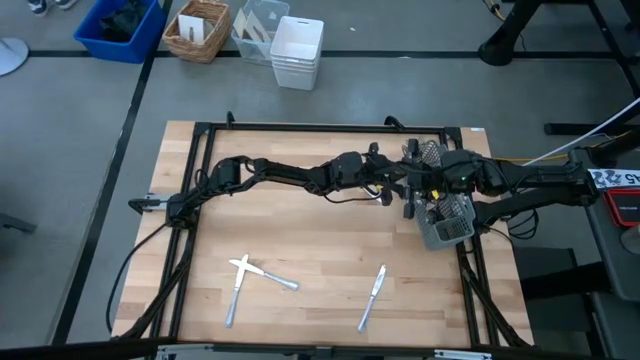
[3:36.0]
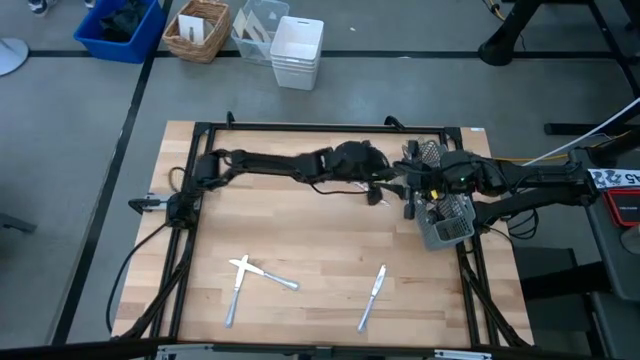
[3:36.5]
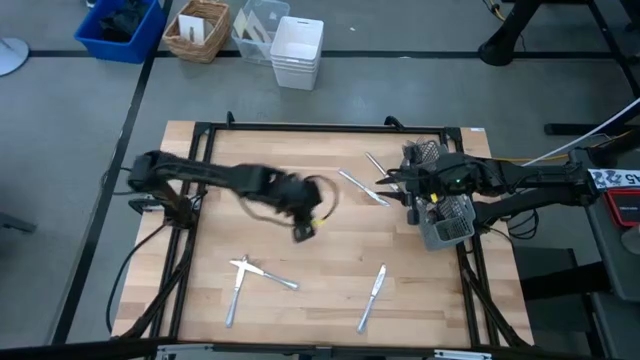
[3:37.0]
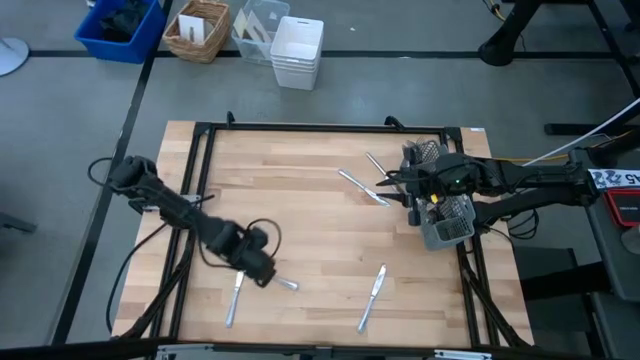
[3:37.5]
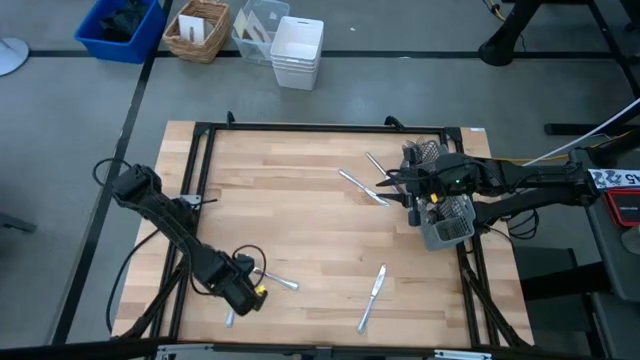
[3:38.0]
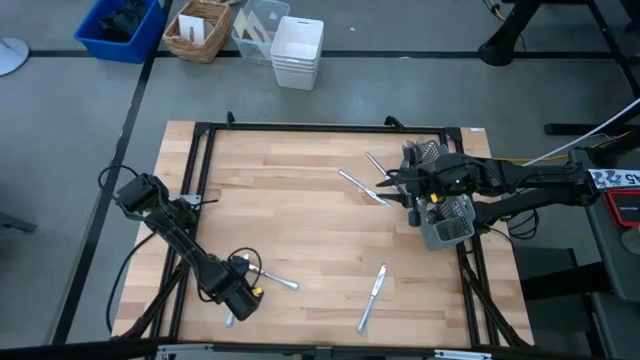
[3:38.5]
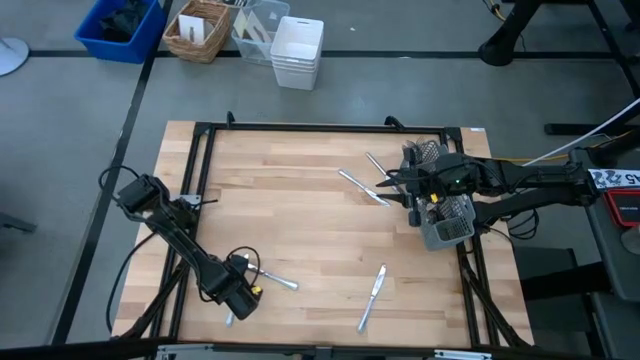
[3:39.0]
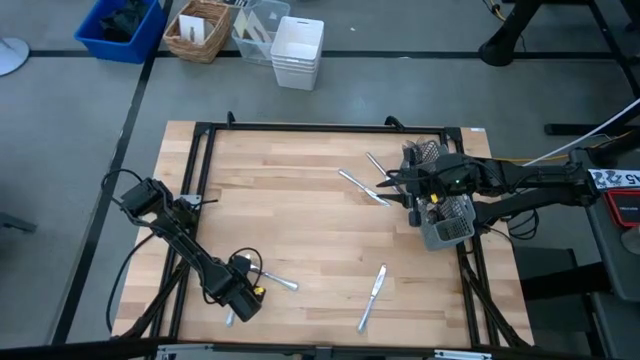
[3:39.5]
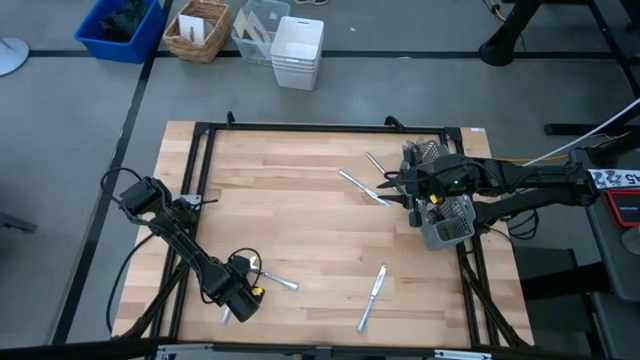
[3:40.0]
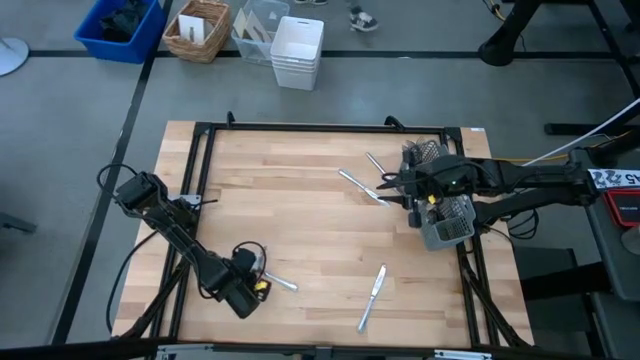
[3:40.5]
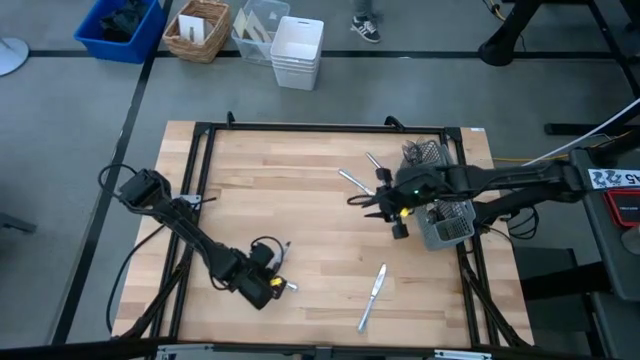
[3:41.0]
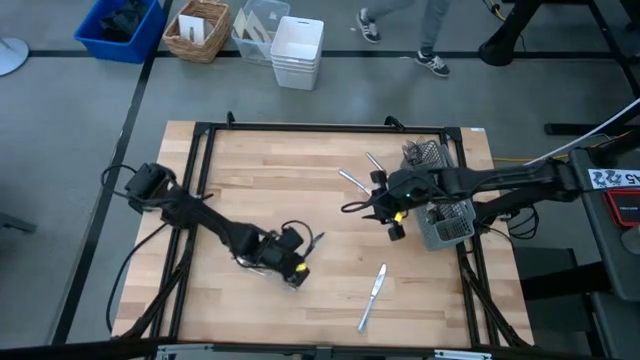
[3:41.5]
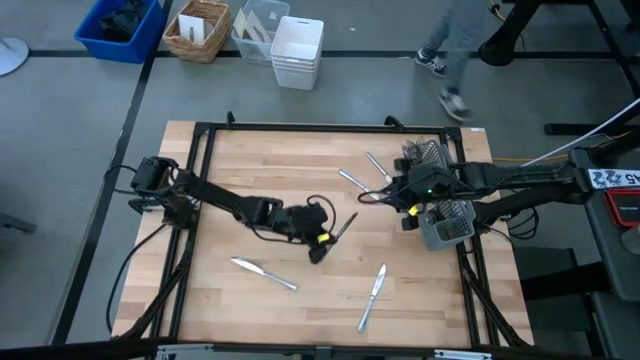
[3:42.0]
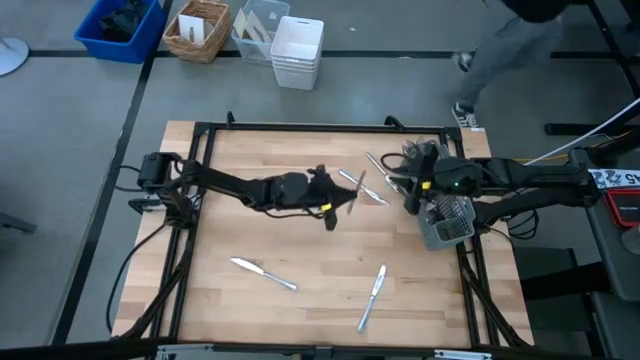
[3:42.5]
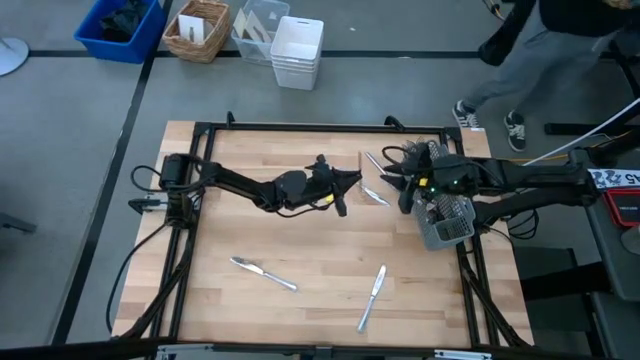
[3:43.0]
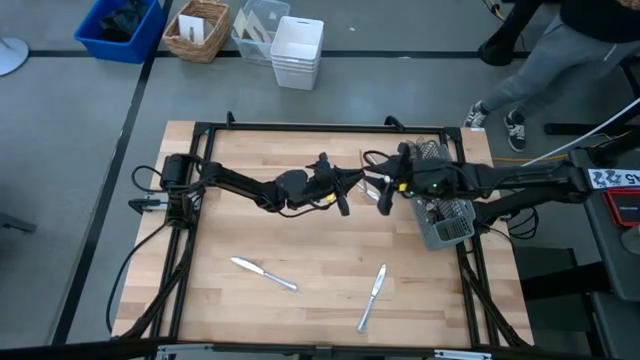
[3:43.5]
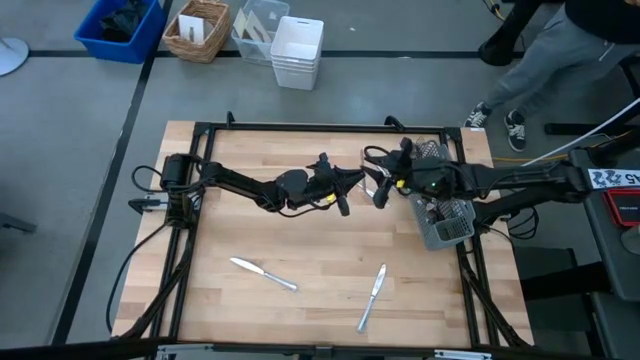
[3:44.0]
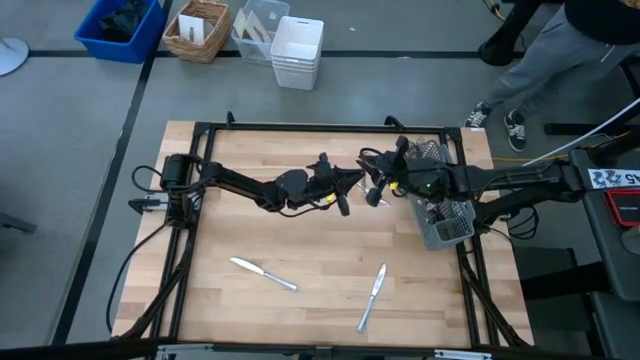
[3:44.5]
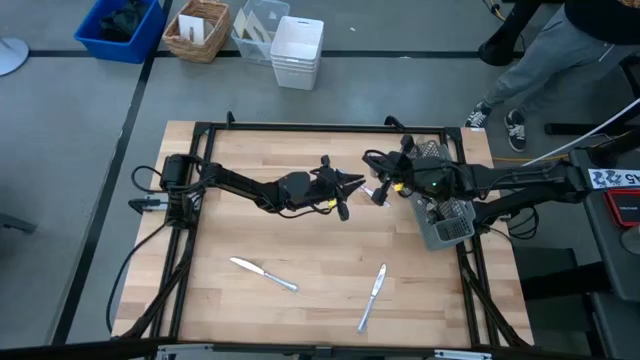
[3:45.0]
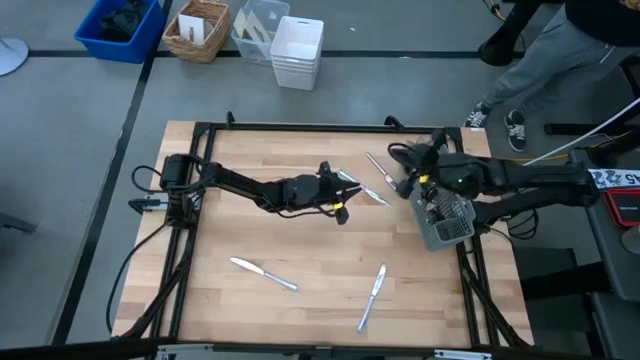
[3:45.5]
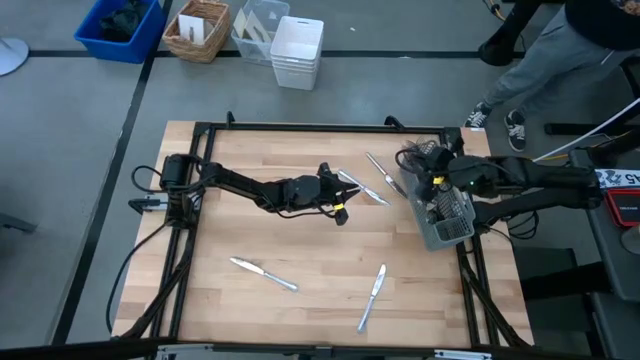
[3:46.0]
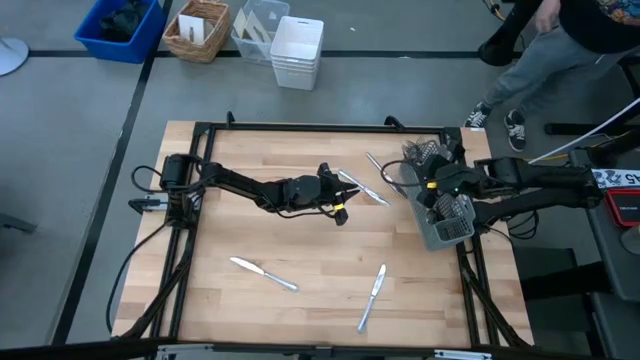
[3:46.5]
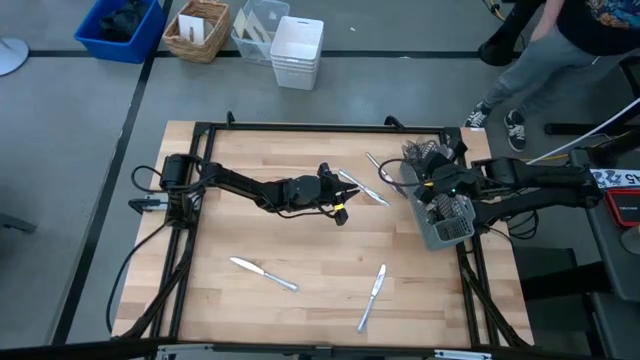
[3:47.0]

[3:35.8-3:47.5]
Task: Sort silverware
Put the knife into the middle section of the utensil holder

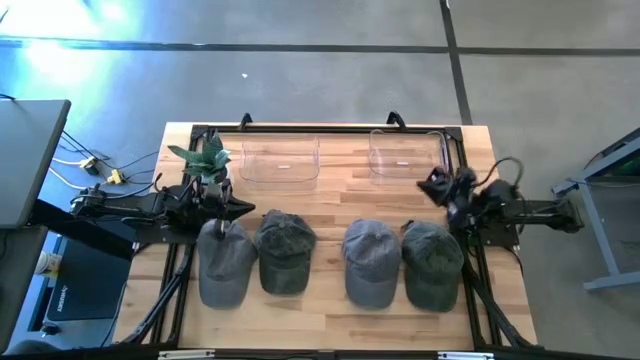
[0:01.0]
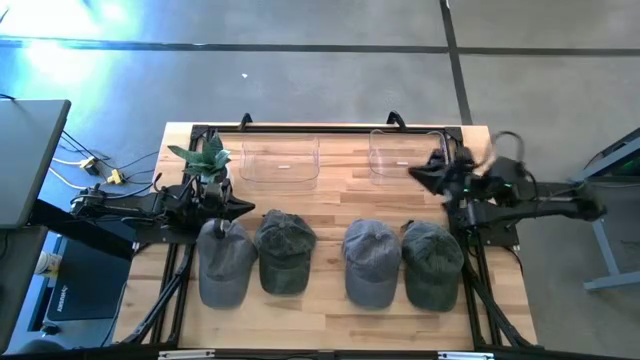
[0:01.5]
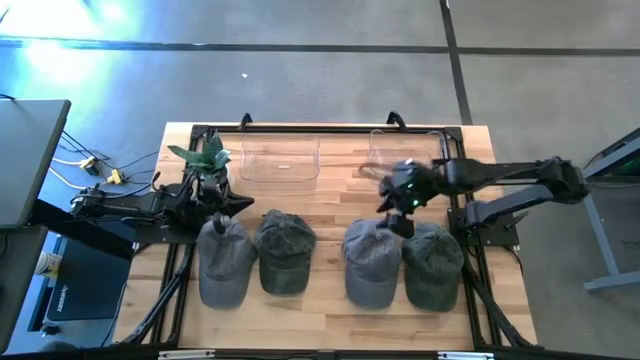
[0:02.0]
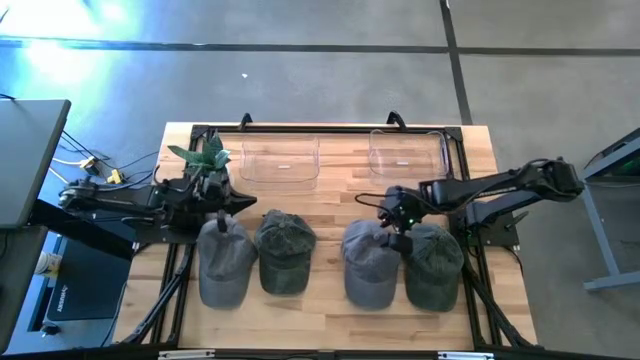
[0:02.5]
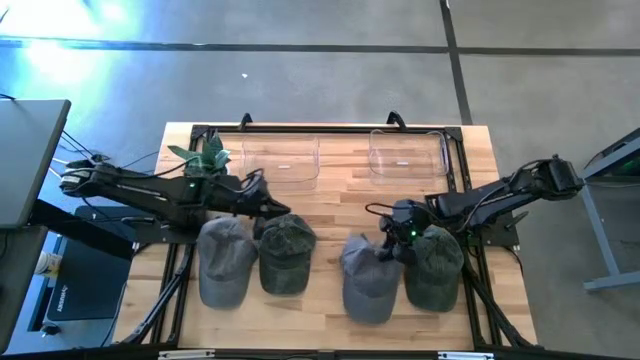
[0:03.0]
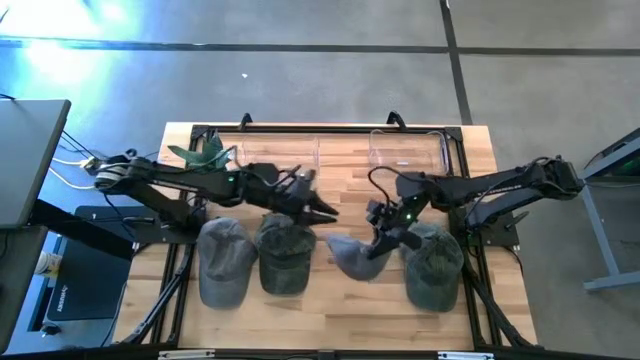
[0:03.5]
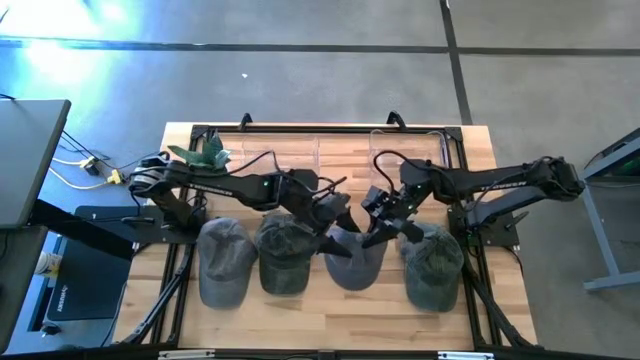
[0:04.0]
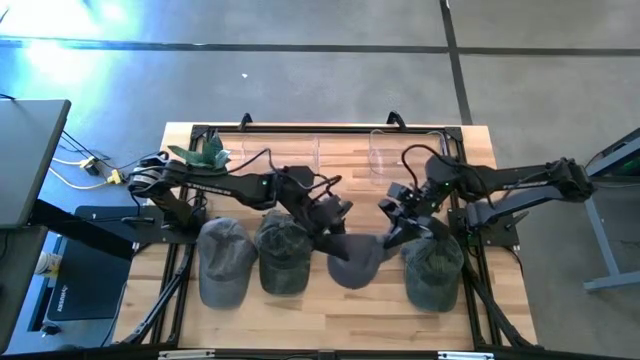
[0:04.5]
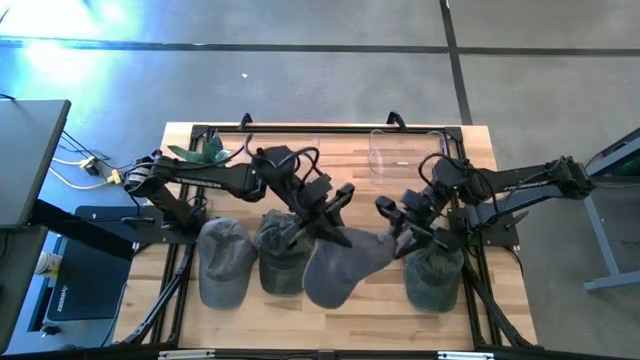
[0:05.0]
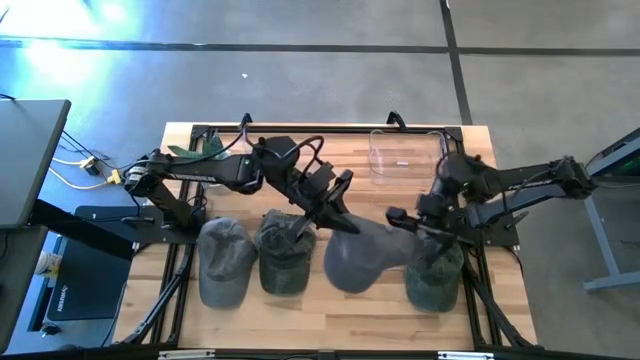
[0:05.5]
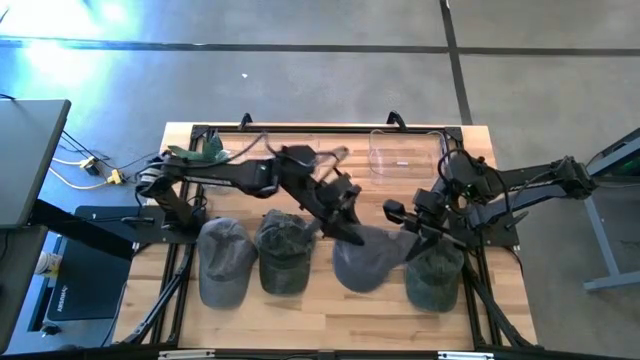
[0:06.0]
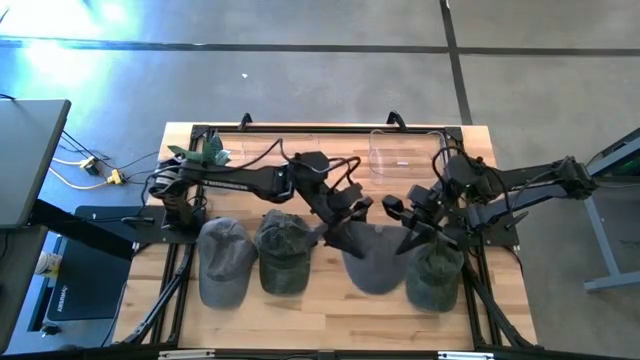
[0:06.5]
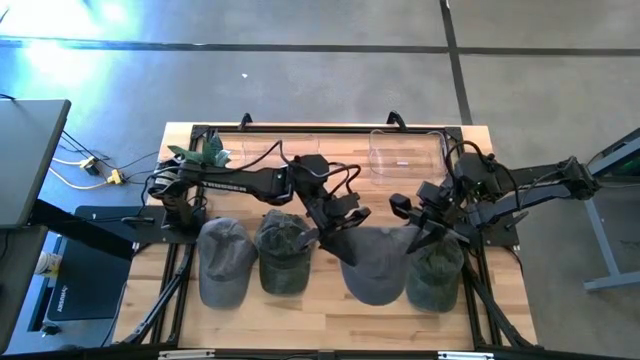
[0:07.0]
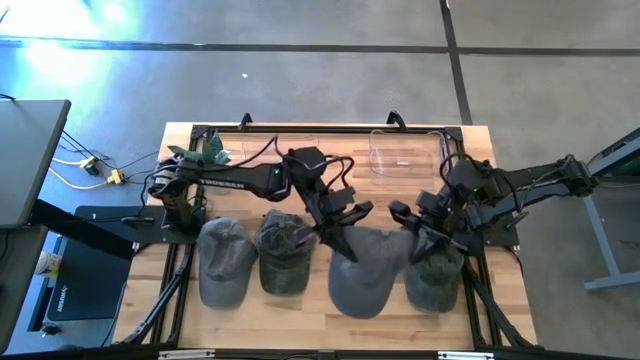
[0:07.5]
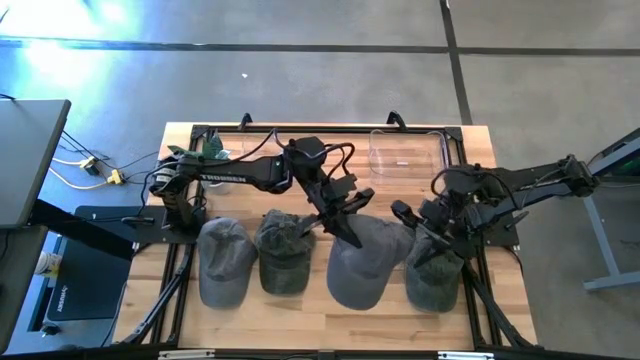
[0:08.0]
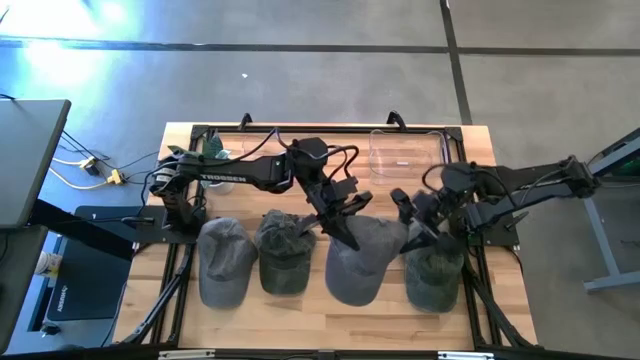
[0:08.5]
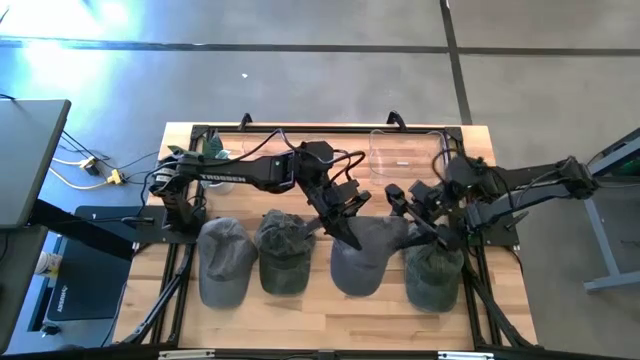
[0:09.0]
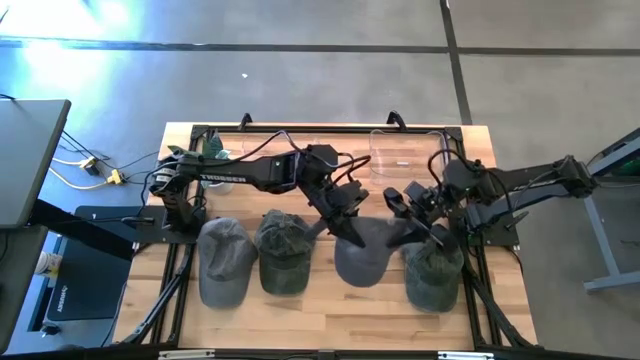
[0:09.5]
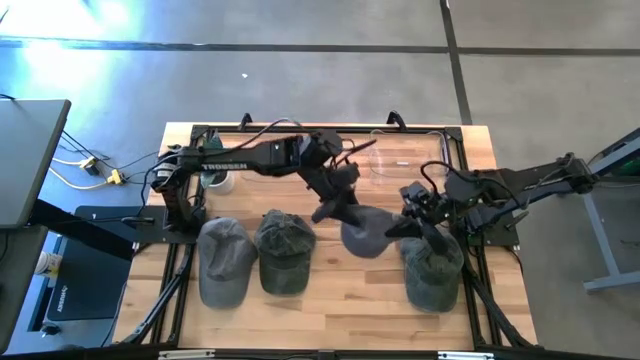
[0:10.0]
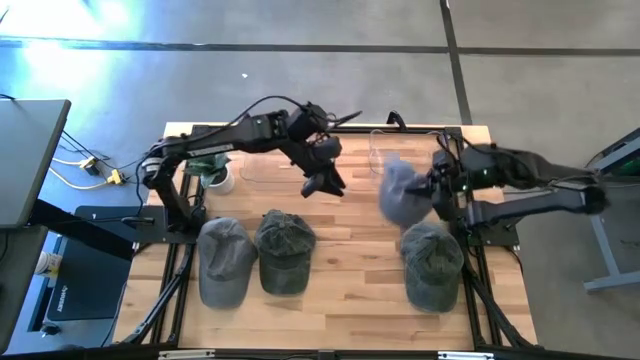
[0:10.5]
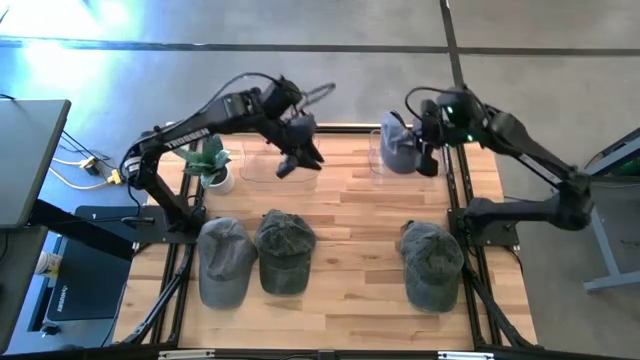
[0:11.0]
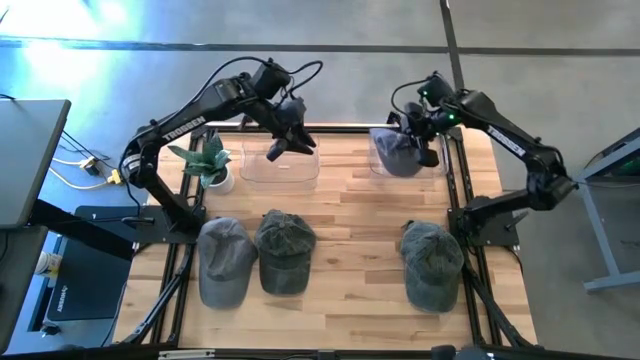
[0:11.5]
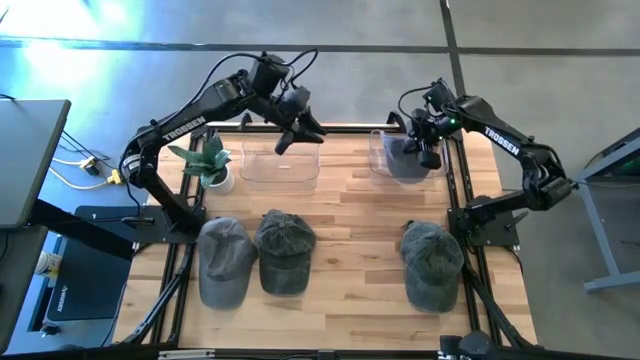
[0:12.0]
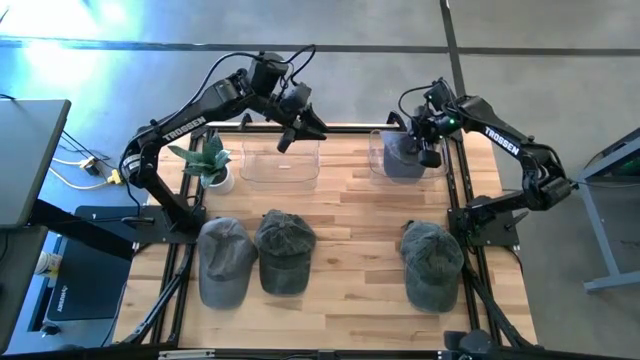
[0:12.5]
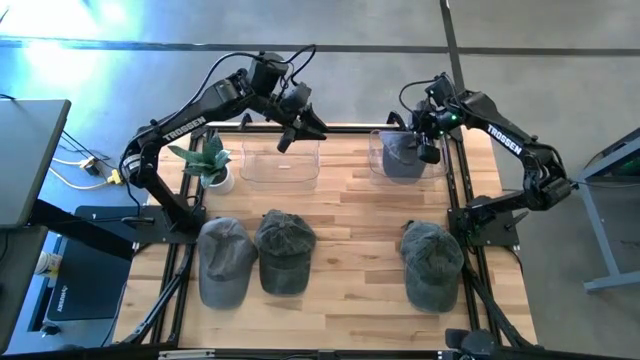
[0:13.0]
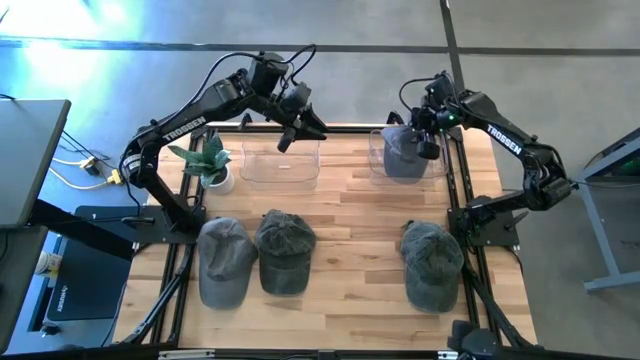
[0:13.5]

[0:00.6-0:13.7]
Task: Pick & Place hat
Put the right gray cap into the right transparent bin
